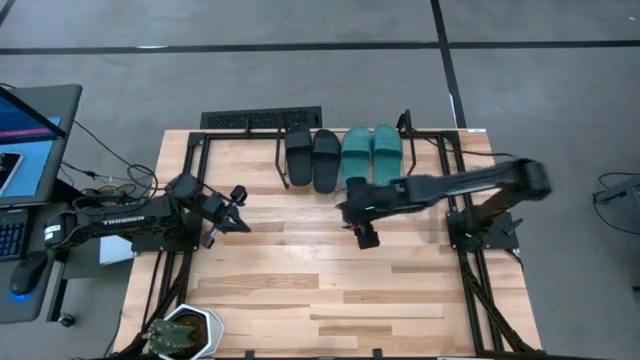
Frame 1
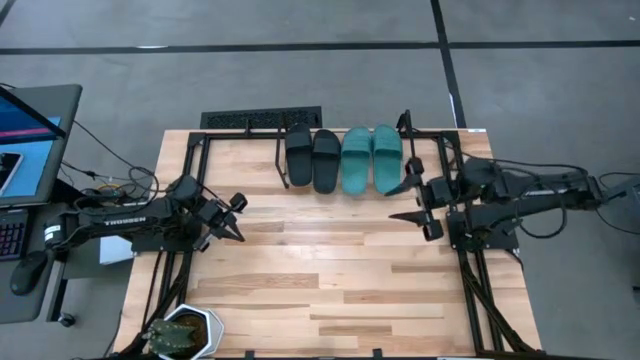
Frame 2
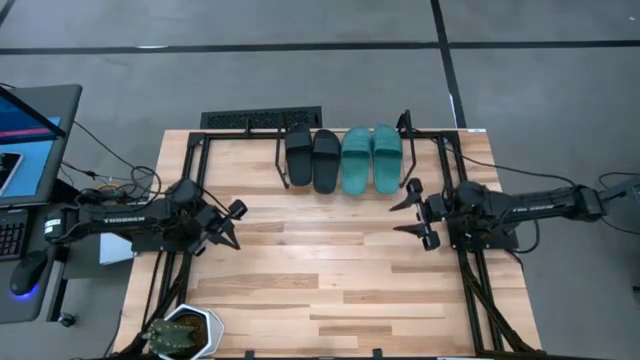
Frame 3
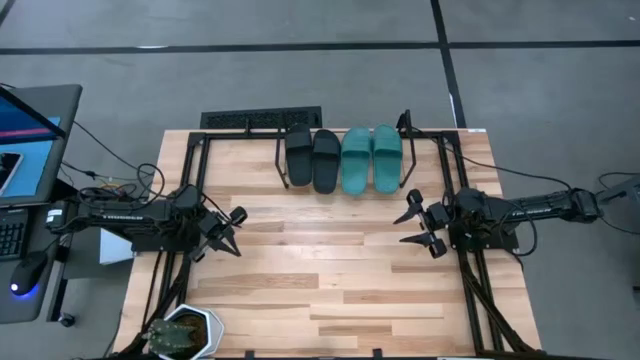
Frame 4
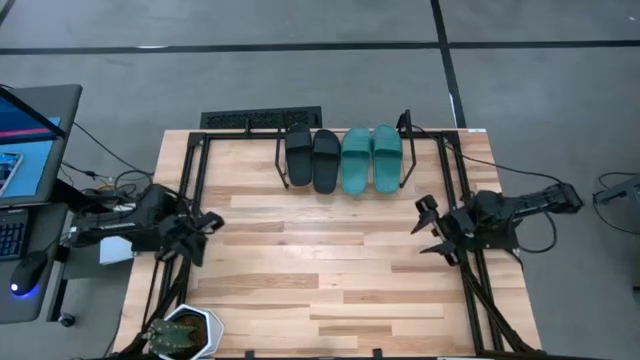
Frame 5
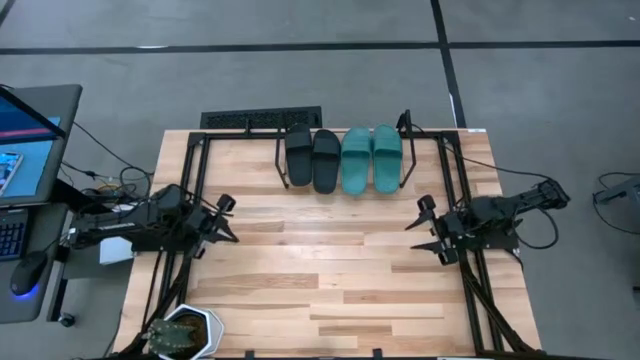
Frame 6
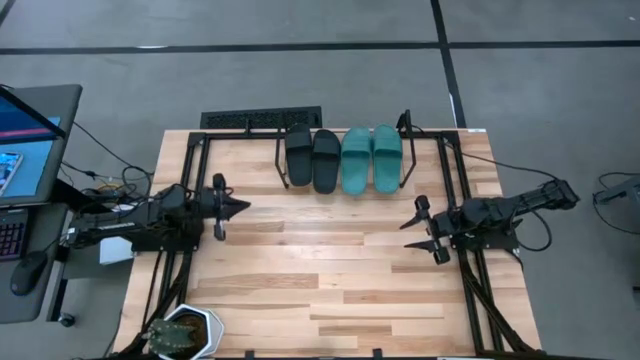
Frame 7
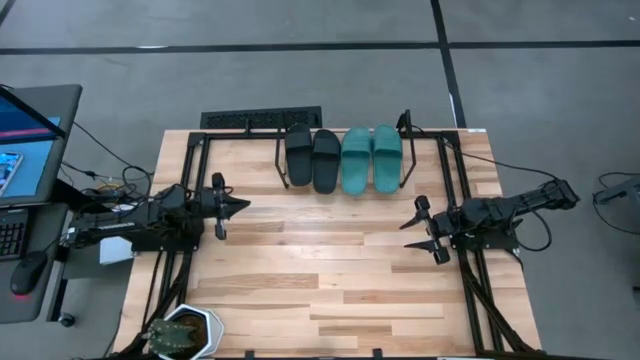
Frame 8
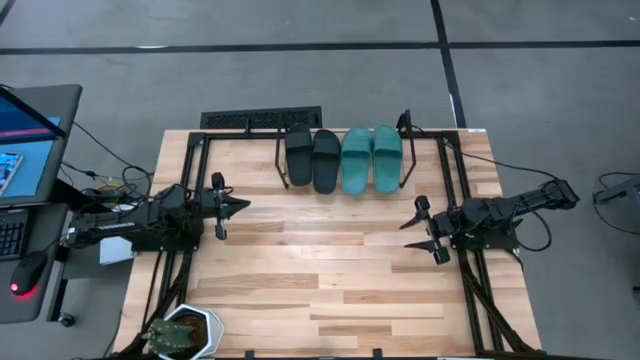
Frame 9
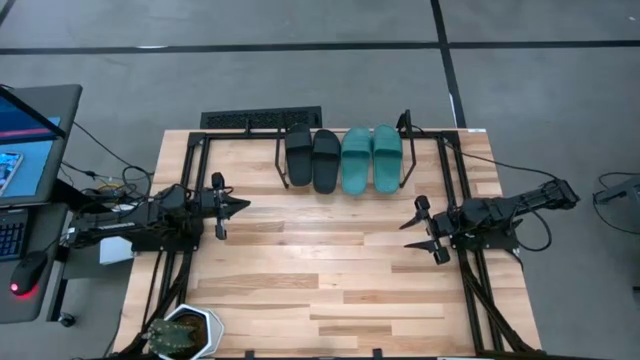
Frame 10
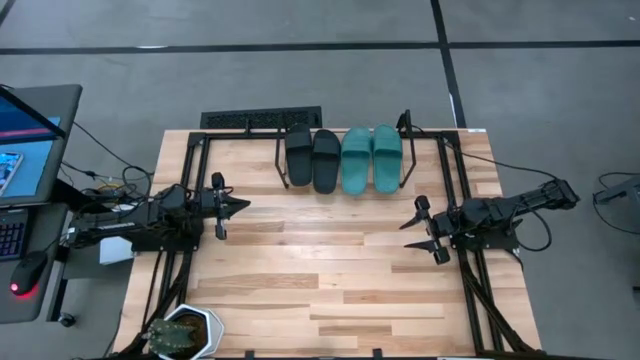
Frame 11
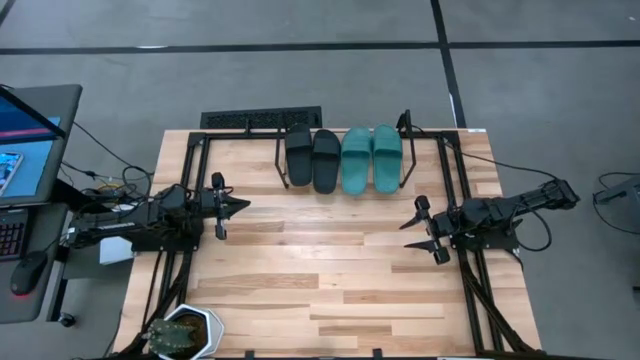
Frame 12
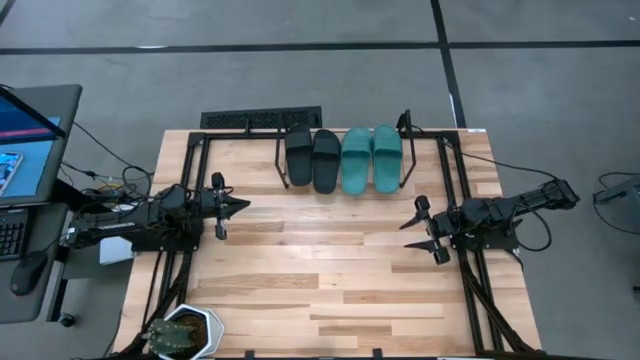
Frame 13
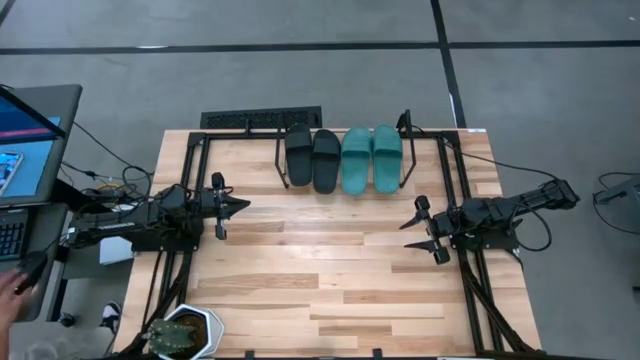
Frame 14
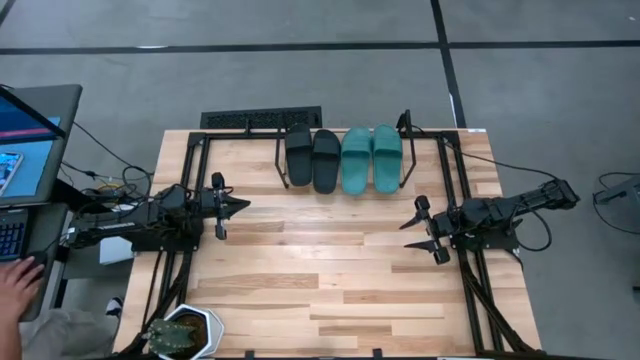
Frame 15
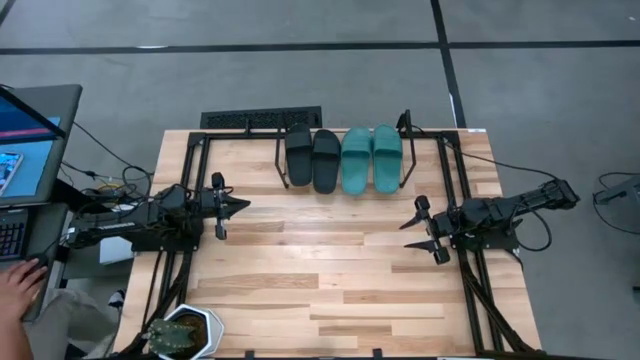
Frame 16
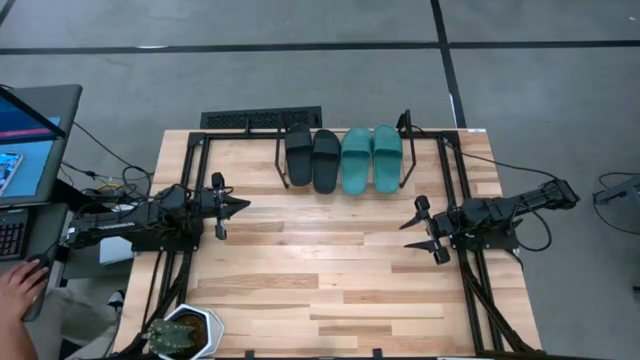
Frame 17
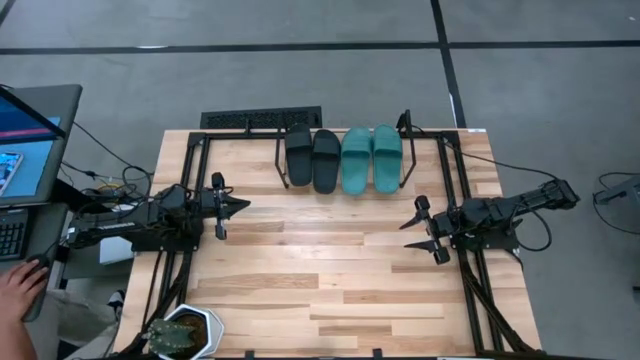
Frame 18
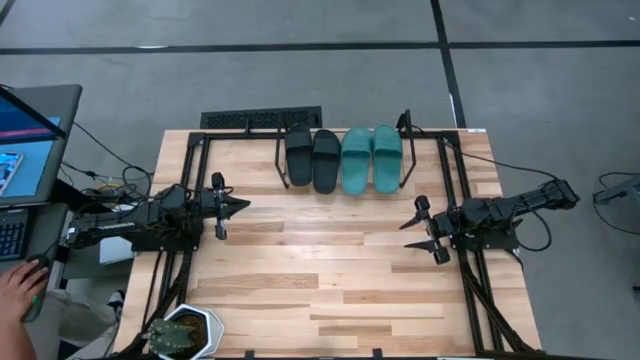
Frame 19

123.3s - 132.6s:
Task: Pick and place slides into the shelf
Return to Home Position

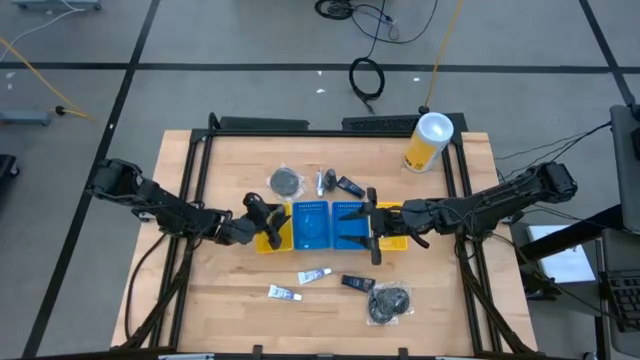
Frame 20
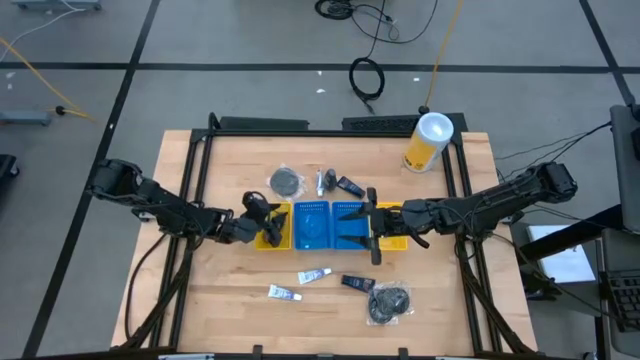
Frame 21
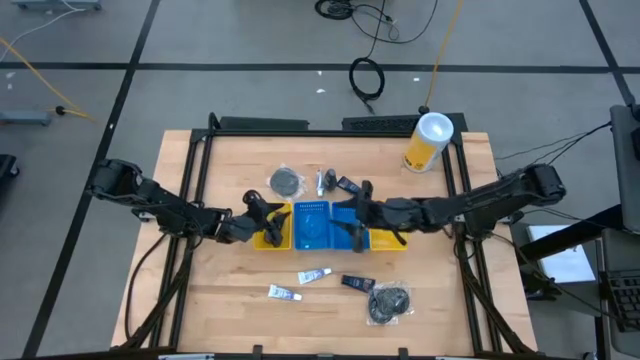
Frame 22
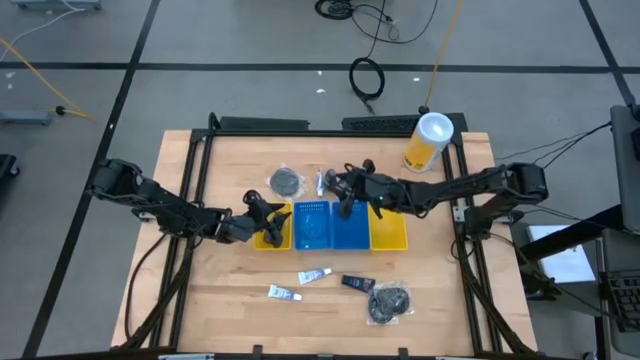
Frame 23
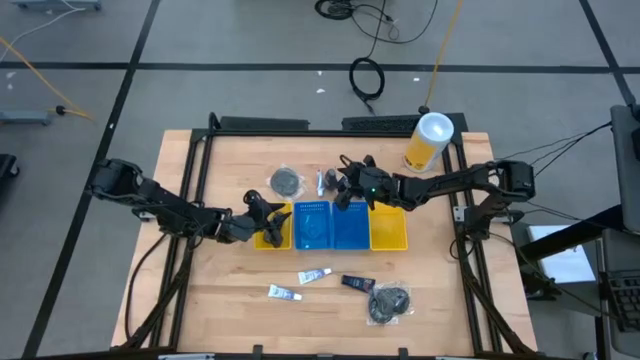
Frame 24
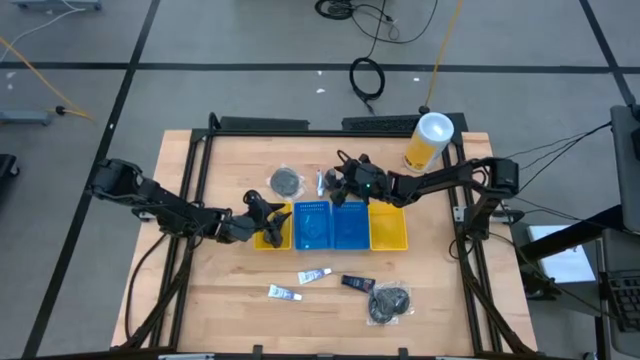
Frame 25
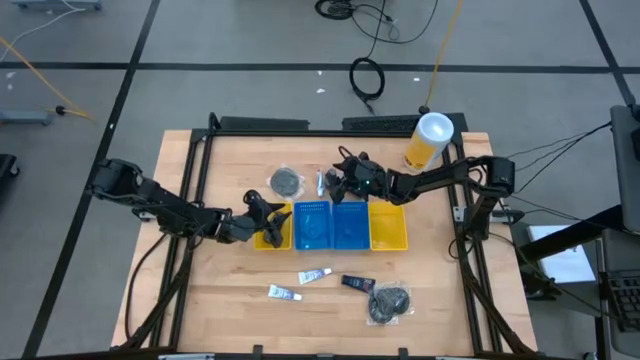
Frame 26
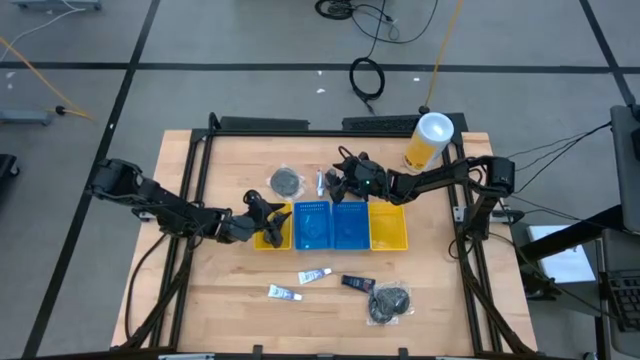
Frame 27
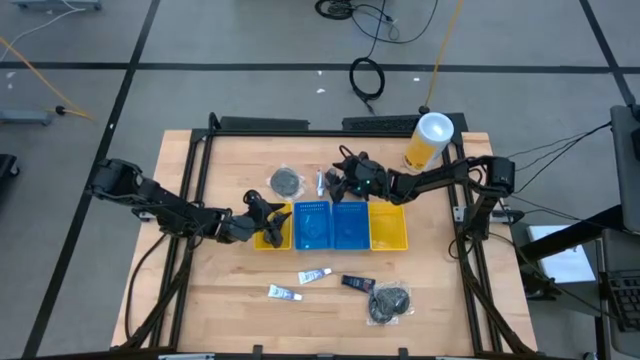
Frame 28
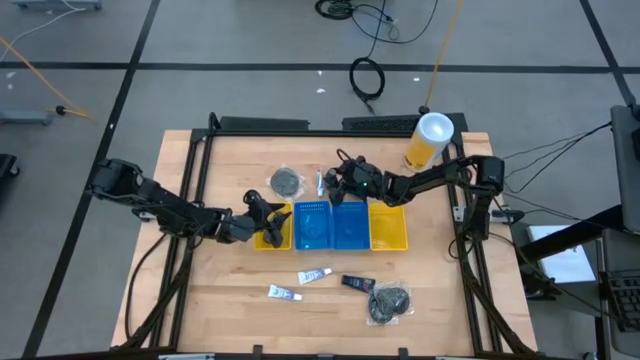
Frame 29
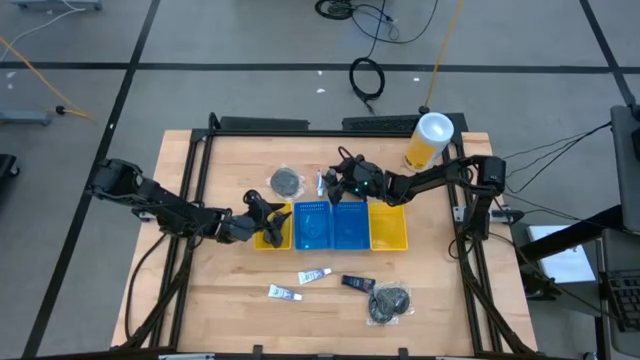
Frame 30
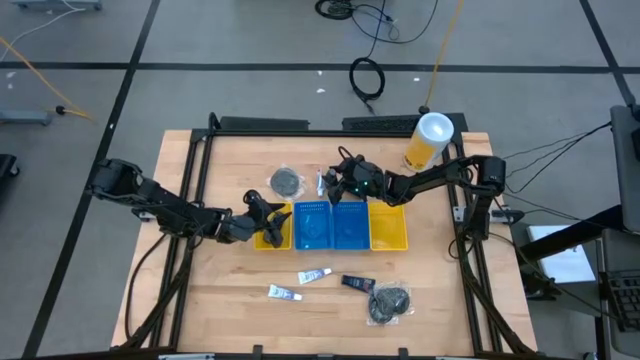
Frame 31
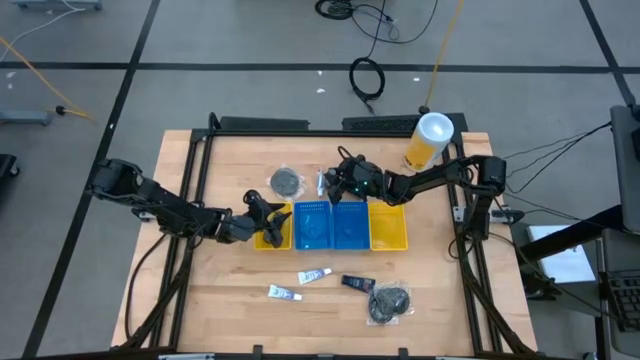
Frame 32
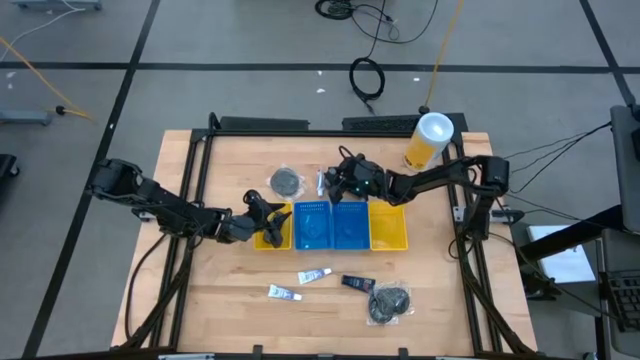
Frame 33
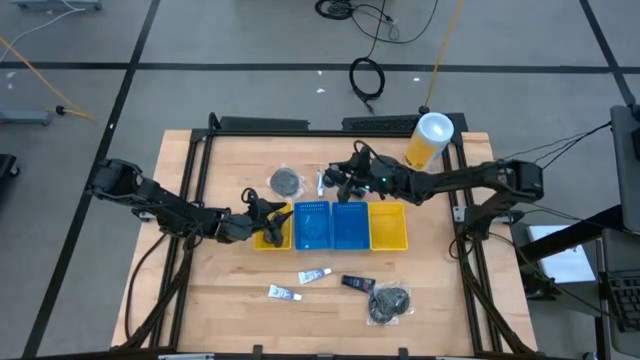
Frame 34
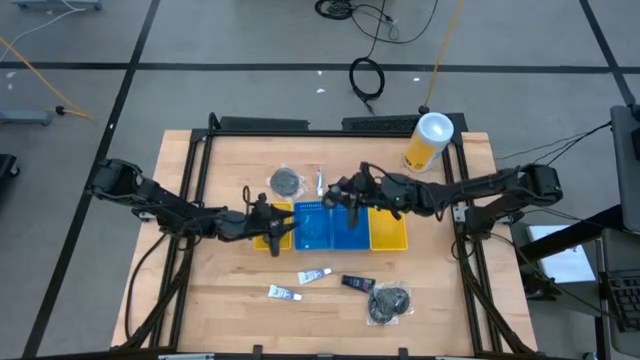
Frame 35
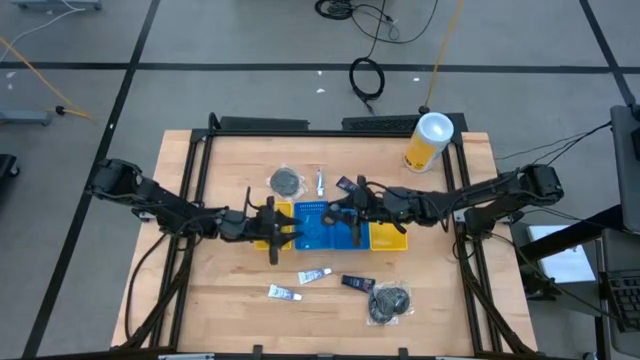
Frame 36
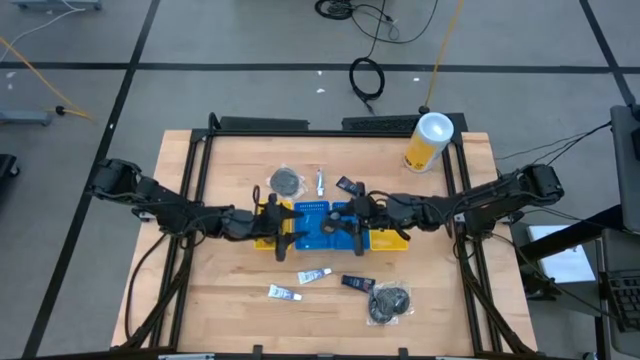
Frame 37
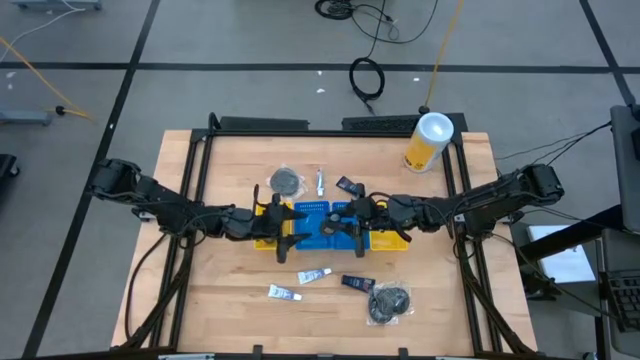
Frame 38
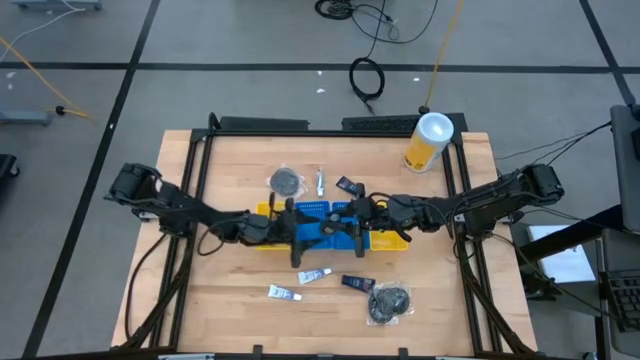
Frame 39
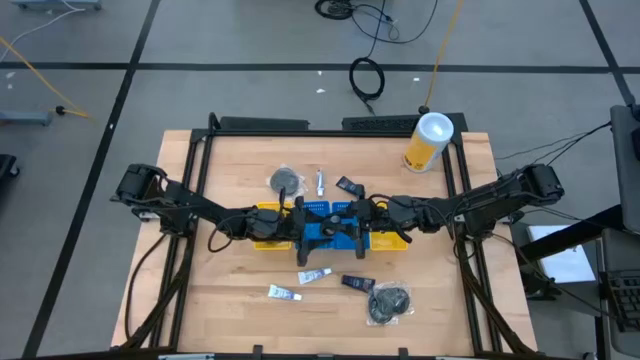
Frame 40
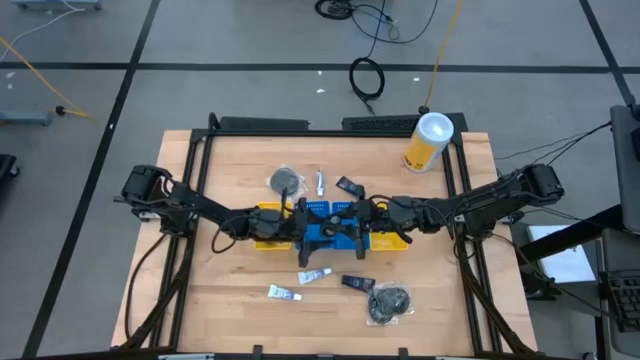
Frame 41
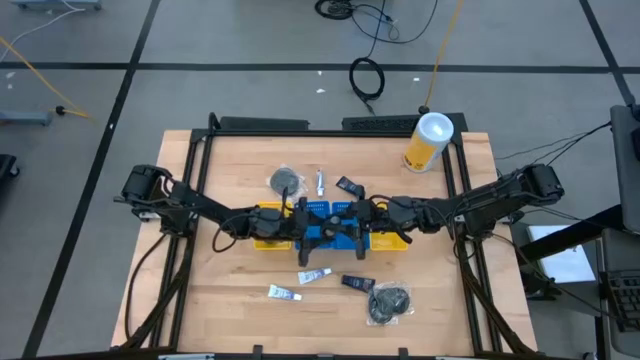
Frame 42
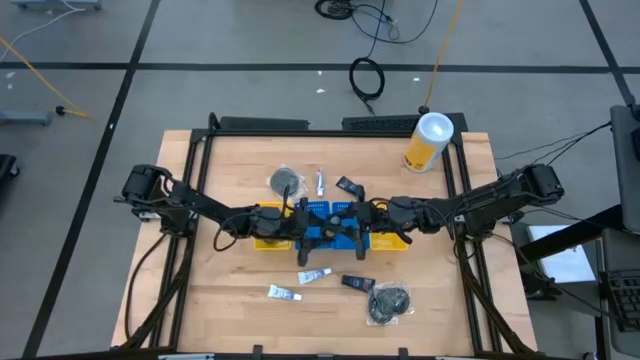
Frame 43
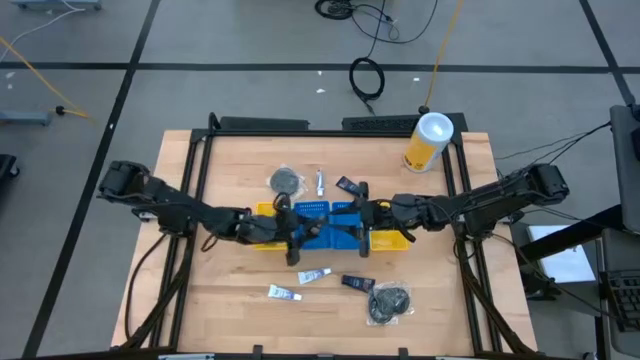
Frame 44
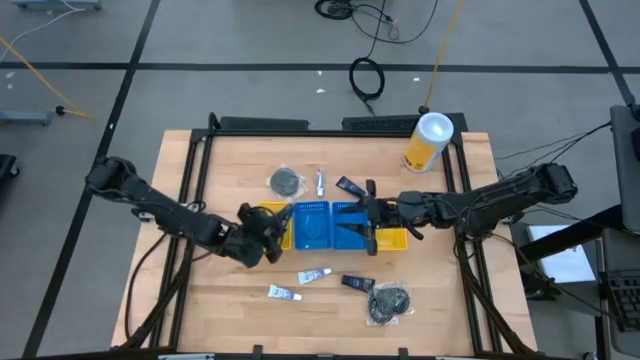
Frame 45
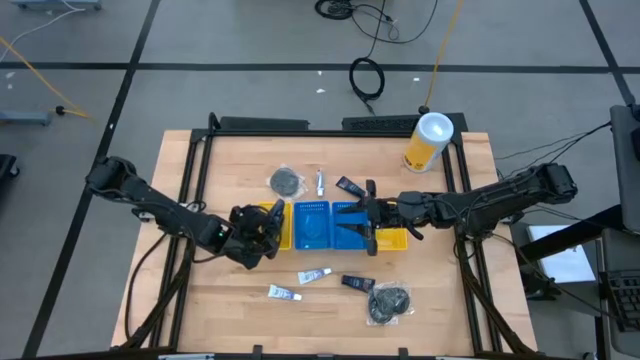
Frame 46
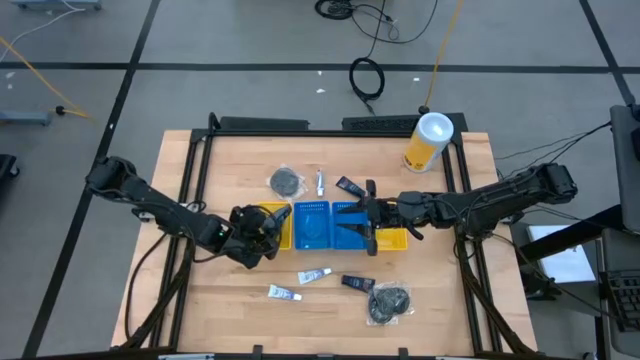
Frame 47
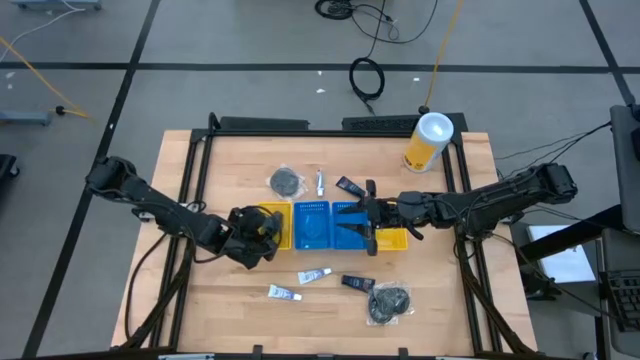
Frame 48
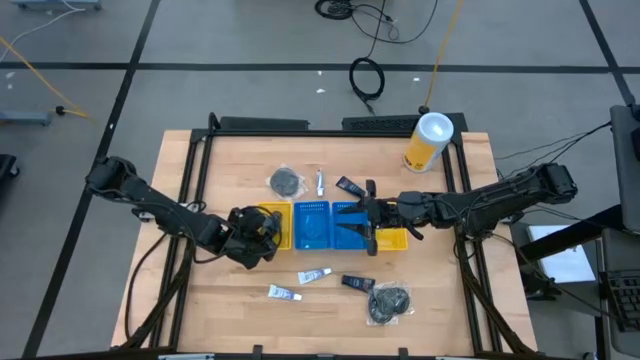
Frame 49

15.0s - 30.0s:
Task: Pick & Place Travel size toiletries
Put the deodorant into the left yellow bin
